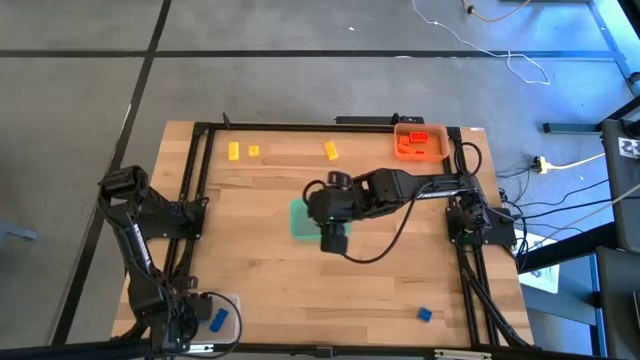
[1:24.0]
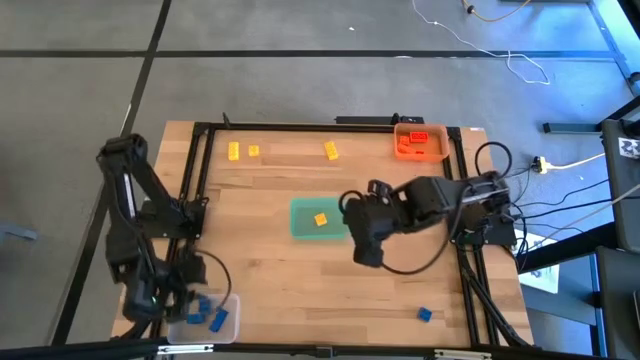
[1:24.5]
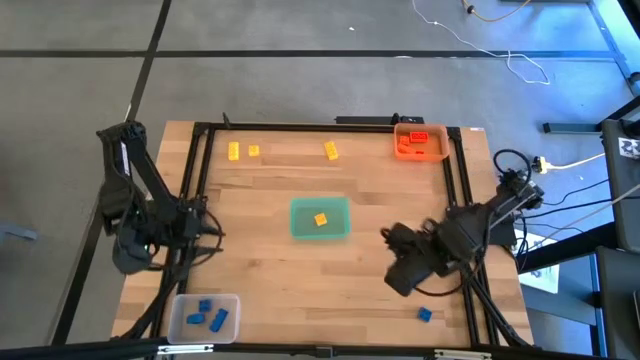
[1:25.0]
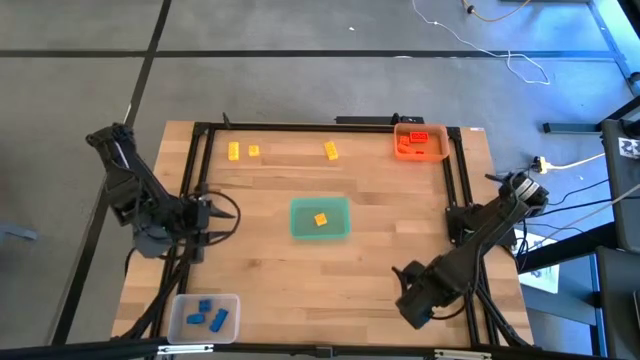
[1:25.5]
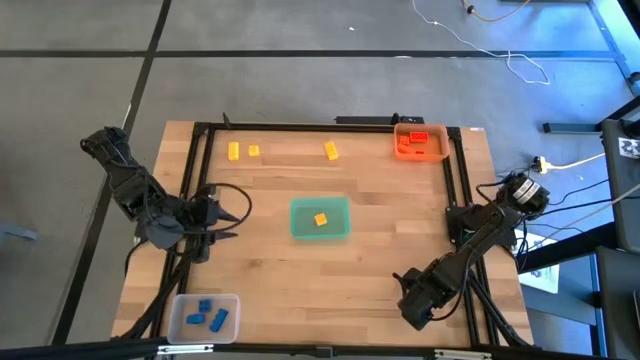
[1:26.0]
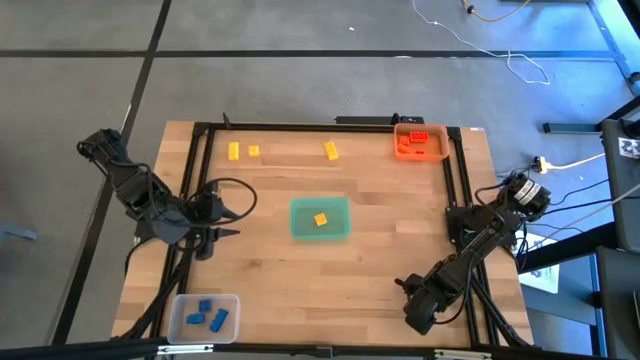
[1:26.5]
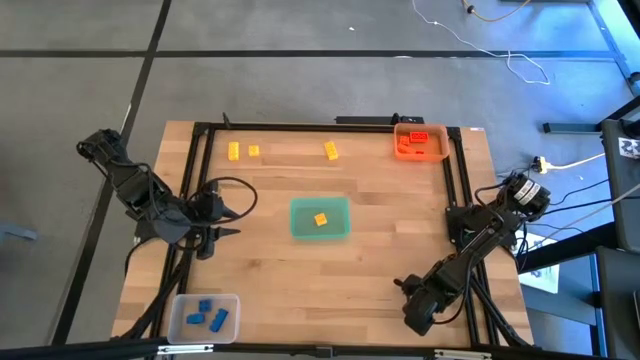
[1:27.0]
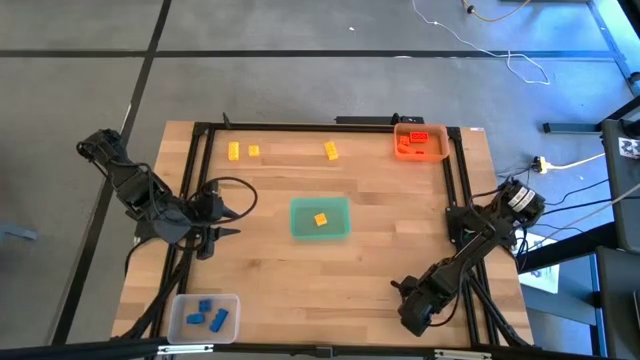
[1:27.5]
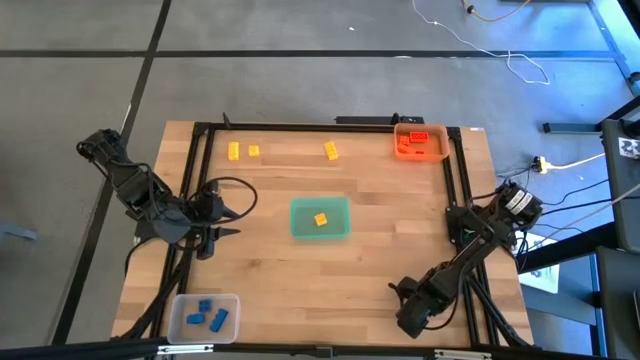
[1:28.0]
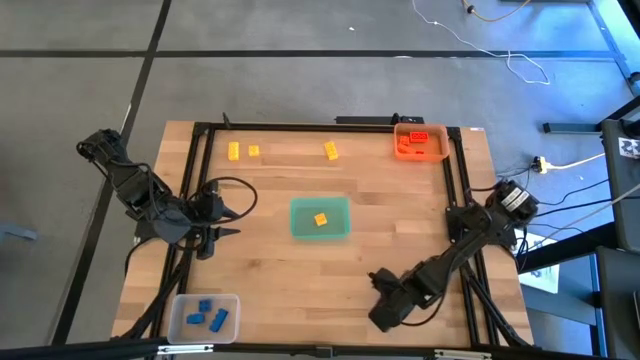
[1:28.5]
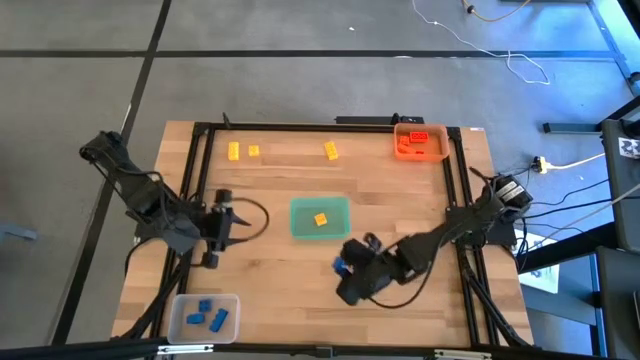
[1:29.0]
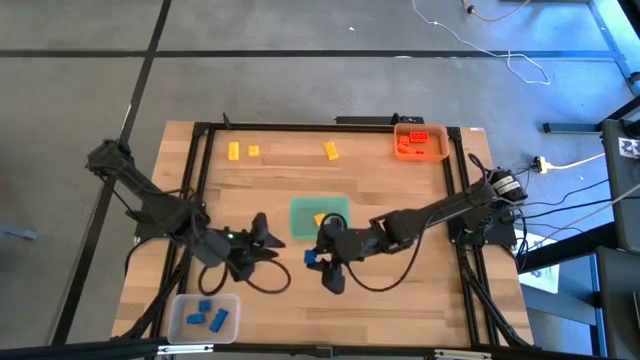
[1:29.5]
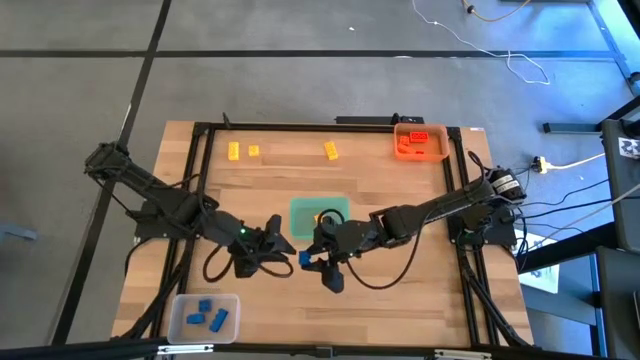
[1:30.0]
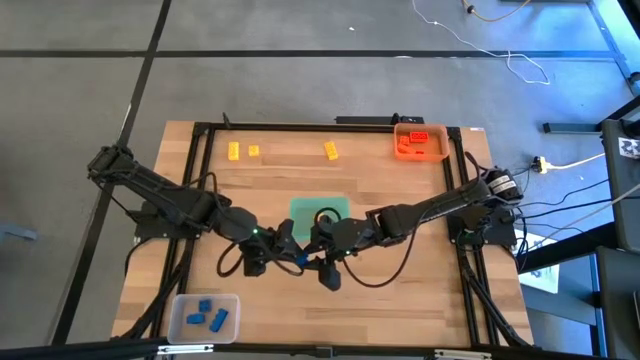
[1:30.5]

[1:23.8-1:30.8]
Task: Sort & place blocks by color
Put the blue game piece into the transparent bin

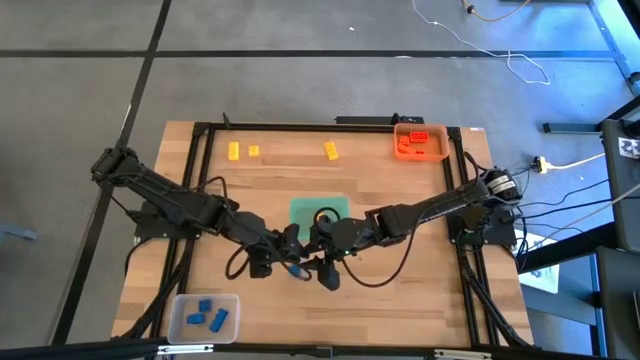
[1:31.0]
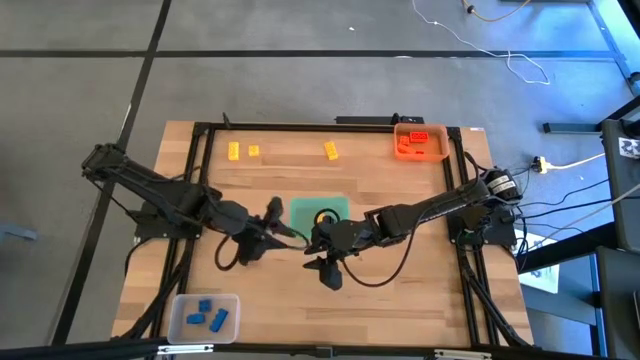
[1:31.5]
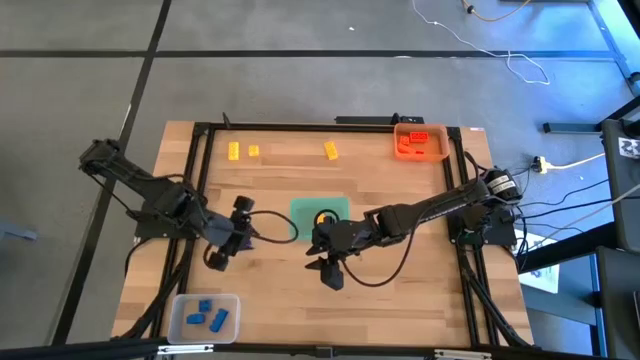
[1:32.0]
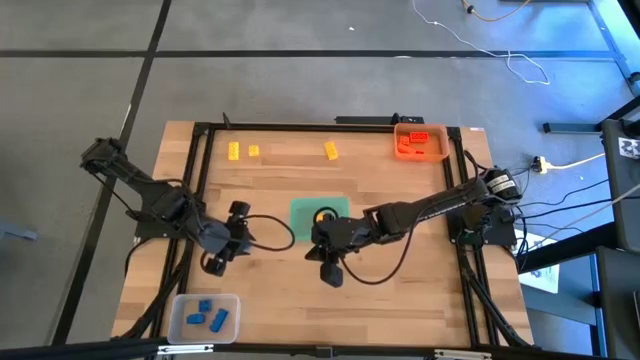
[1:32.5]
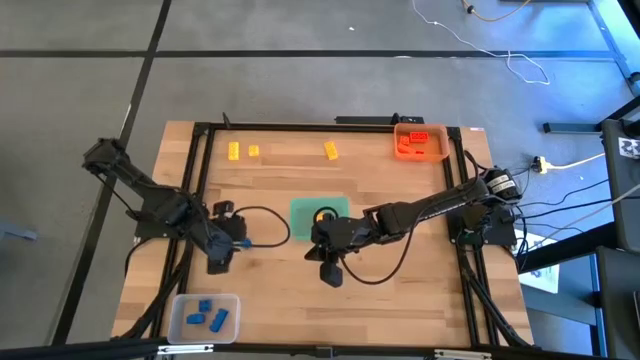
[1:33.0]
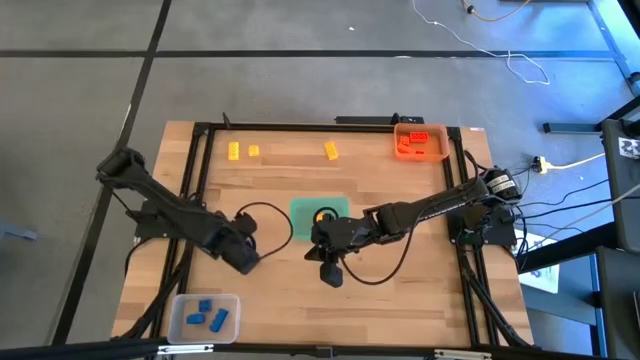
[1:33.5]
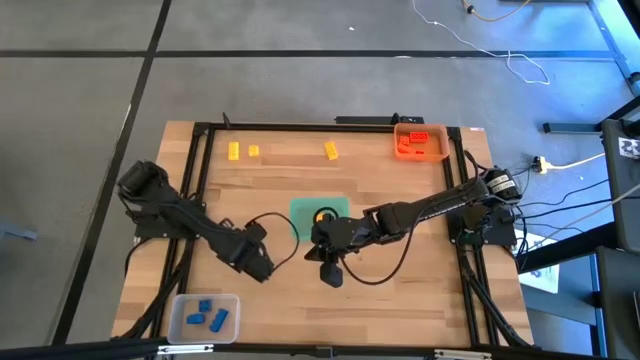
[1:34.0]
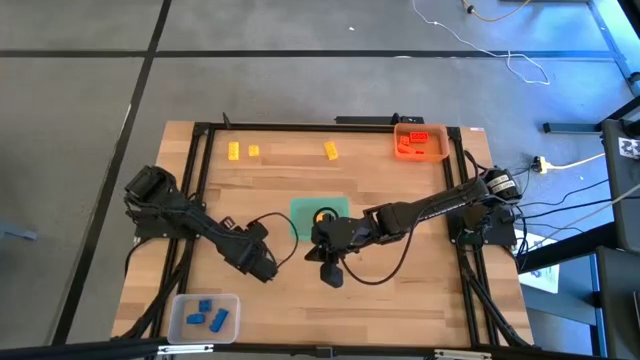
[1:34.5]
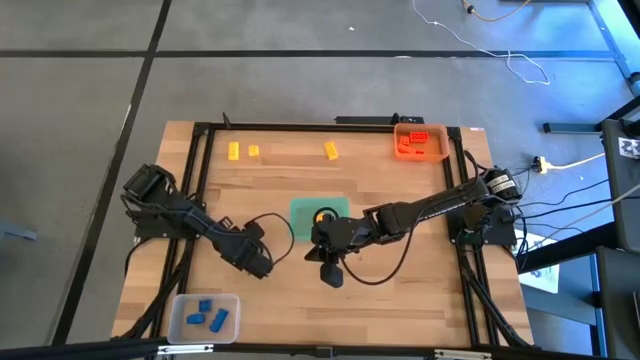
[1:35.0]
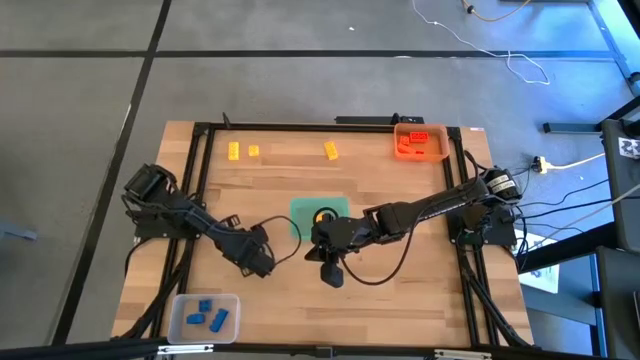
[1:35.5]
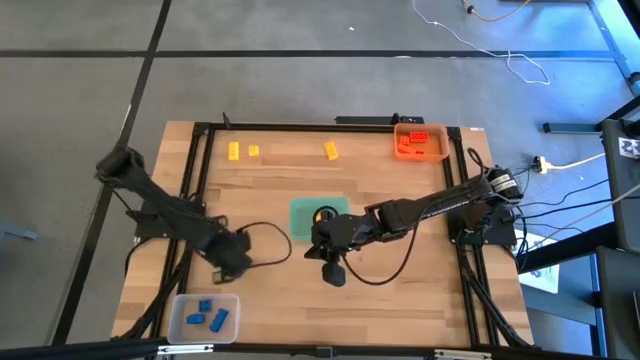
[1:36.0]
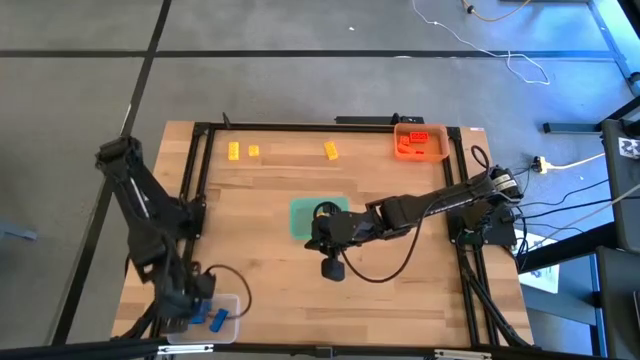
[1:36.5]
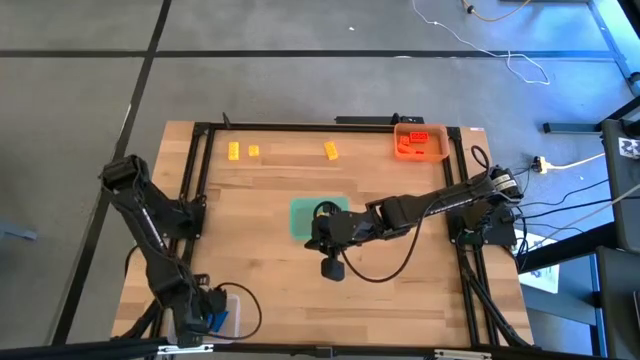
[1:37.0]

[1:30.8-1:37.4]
Put the blue game piece into the transparent bin

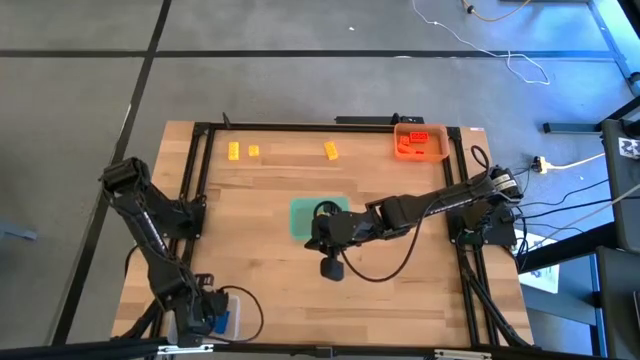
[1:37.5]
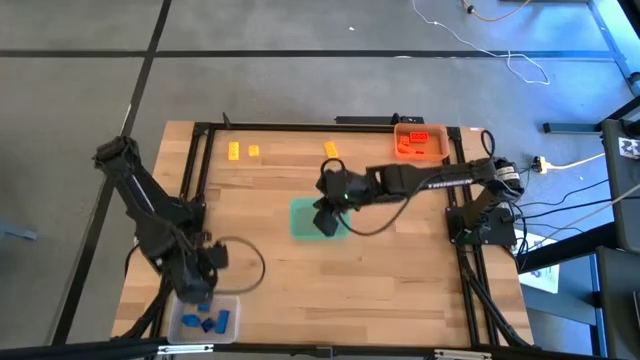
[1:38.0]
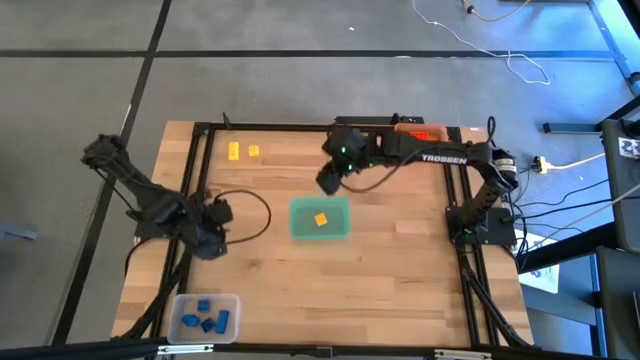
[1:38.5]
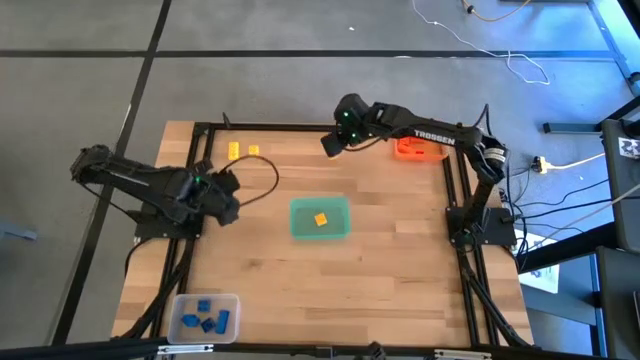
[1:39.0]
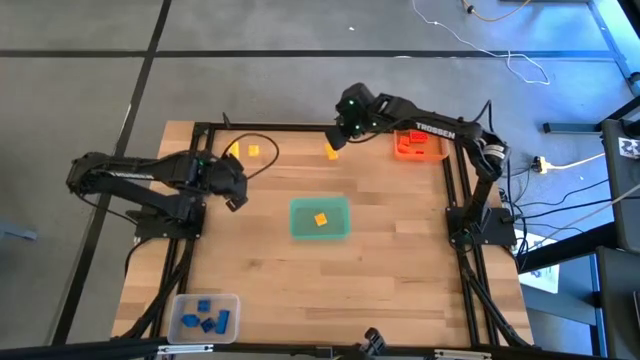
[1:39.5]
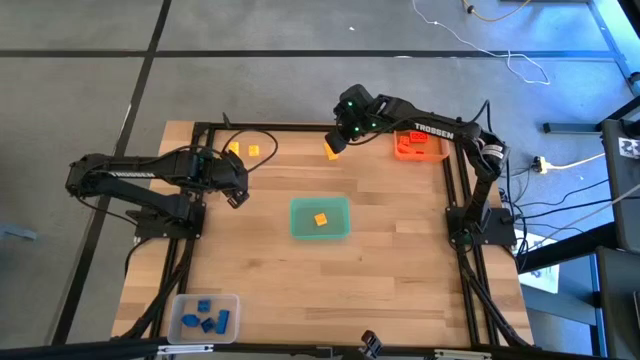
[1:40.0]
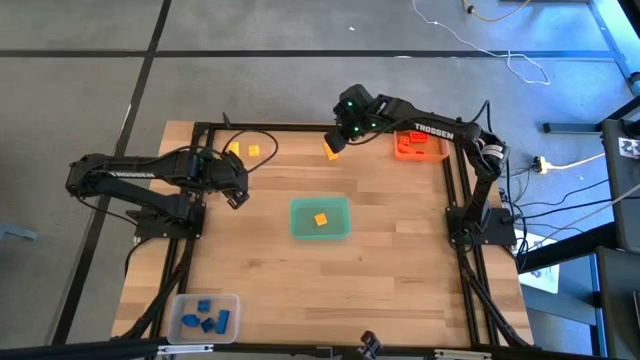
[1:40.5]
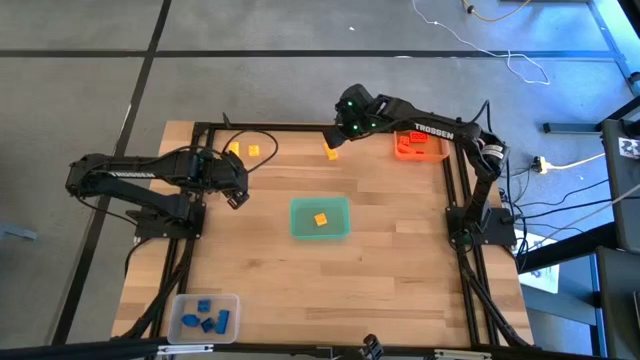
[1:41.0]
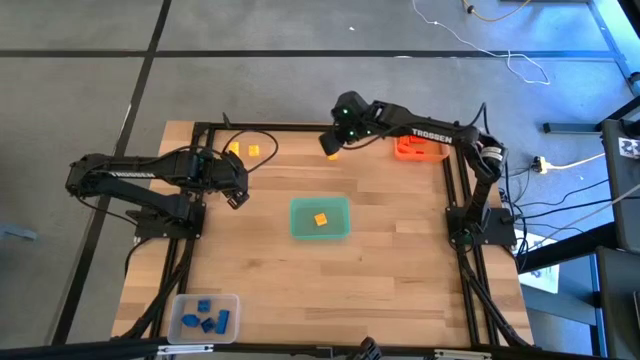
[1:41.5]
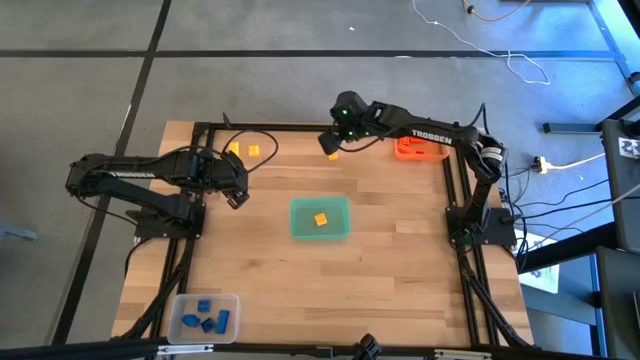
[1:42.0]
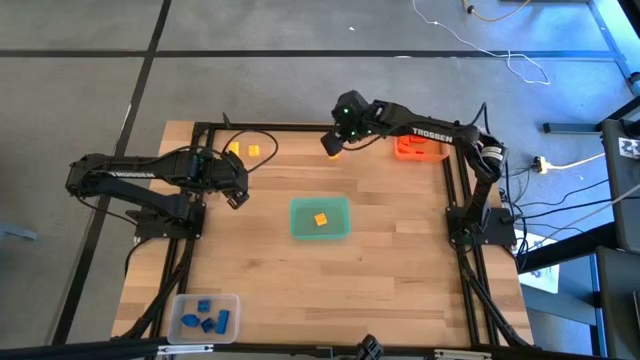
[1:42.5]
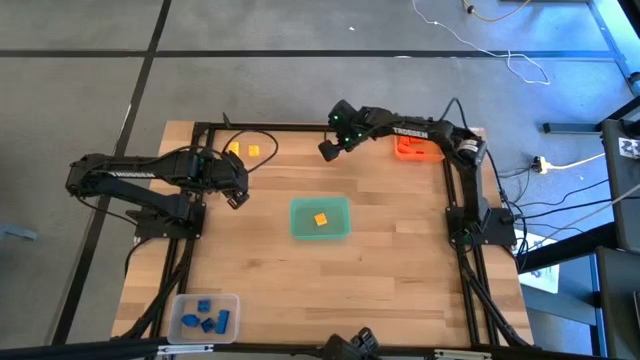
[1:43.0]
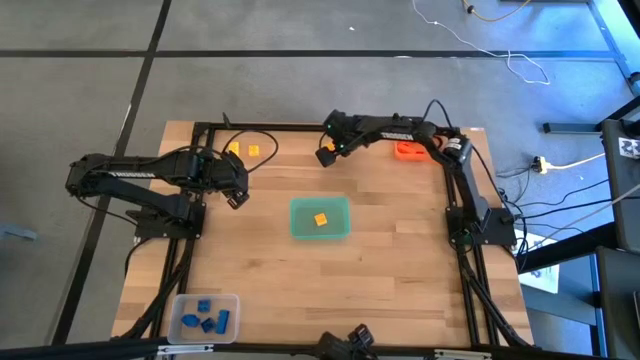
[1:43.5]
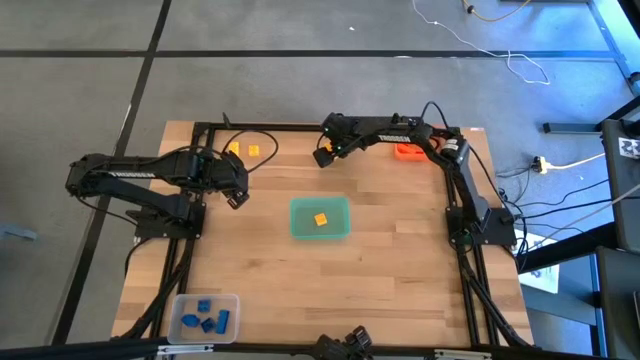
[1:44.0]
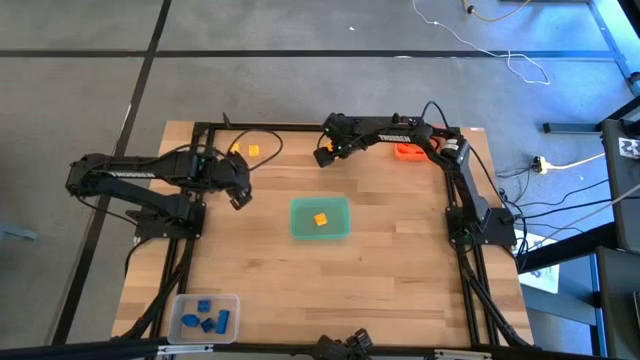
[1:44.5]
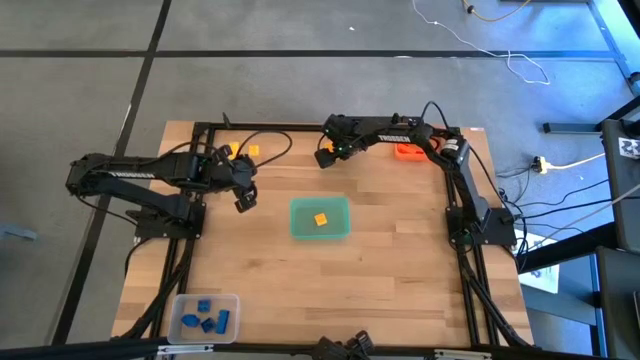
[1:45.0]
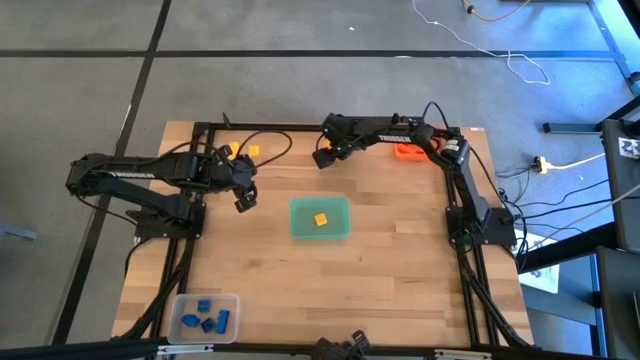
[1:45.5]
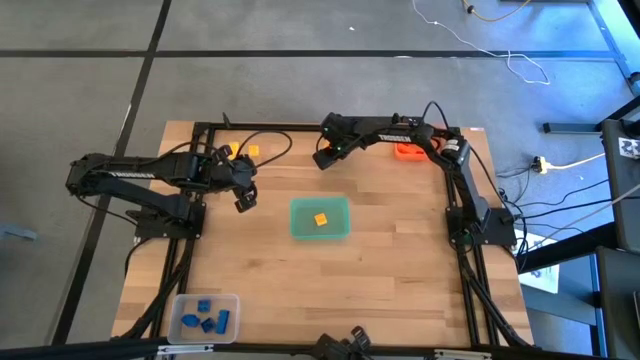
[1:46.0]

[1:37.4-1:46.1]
Put the yellow game piece into the blue bin
